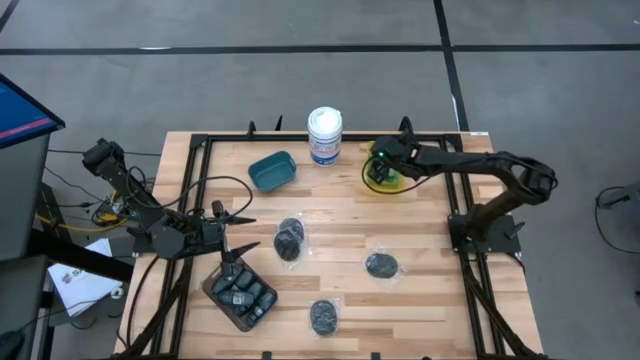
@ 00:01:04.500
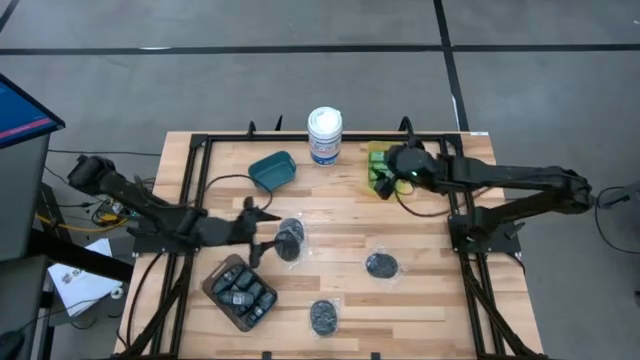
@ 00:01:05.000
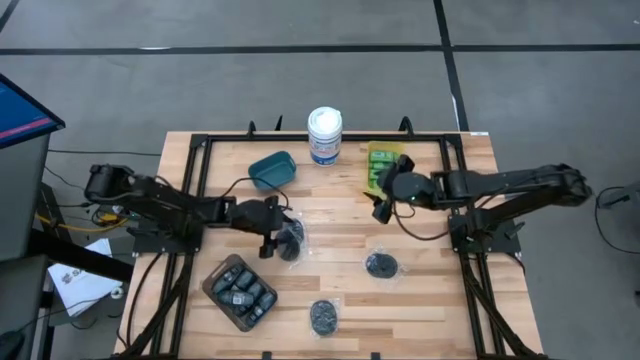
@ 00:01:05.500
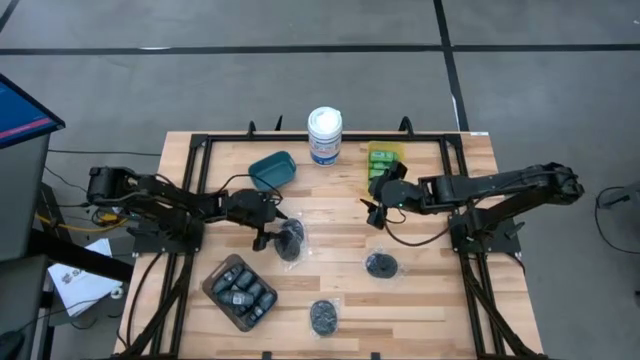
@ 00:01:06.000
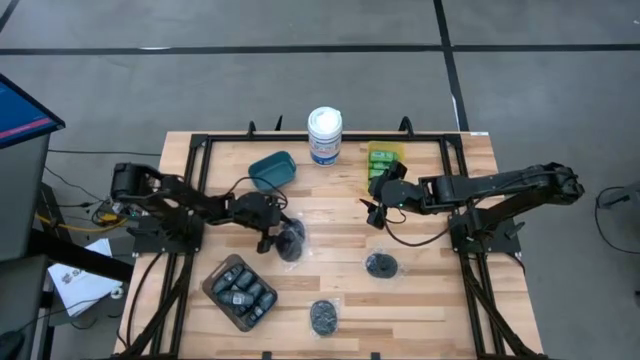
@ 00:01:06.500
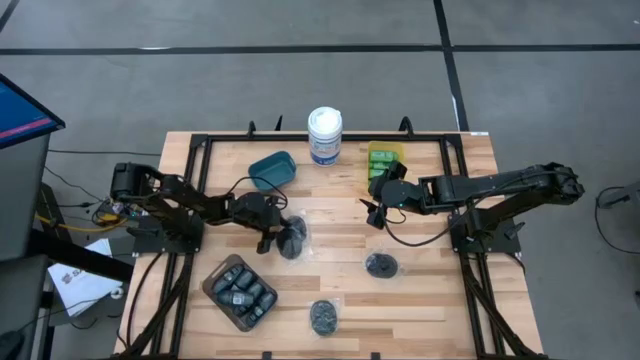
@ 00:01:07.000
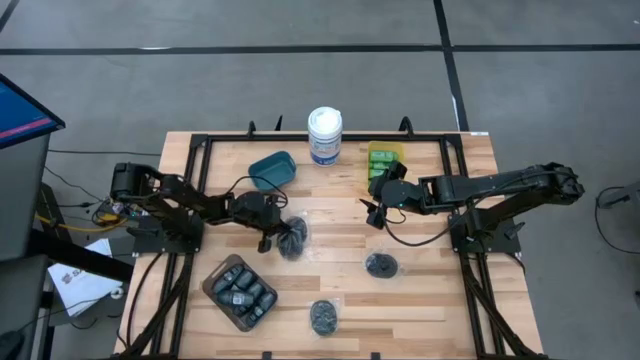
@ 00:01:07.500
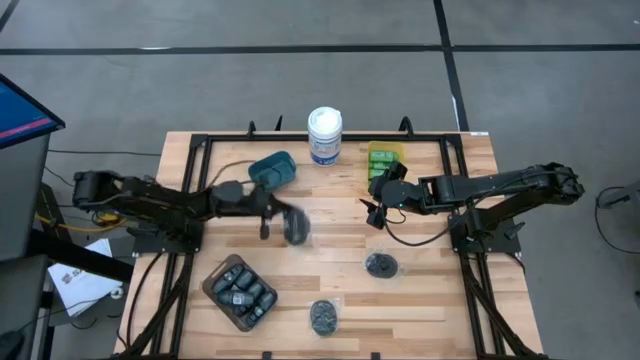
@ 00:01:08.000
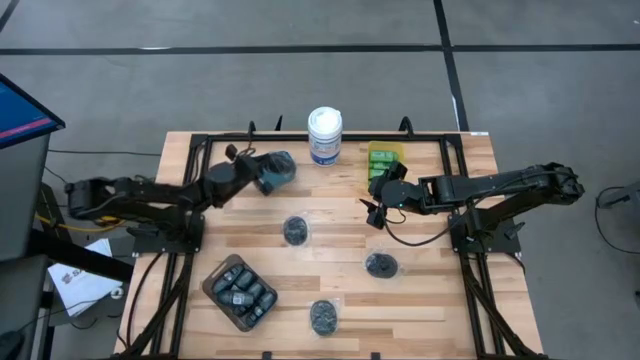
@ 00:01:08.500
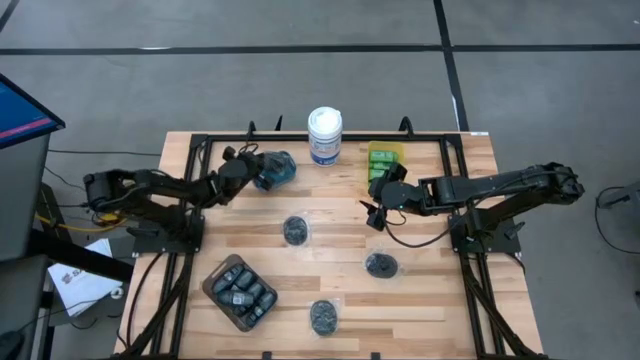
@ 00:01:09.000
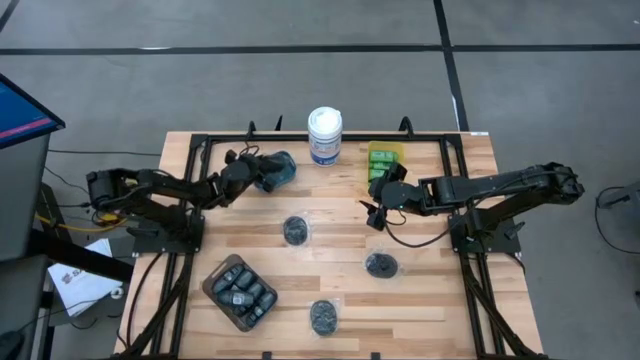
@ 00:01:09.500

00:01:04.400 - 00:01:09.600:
Task: Pick & Place Travel size toiletries
Put the black hairbrush into the blue bin

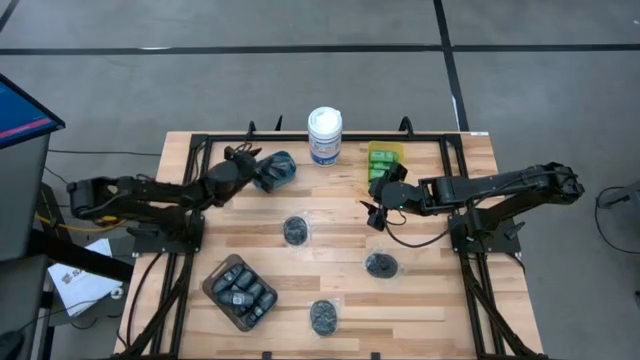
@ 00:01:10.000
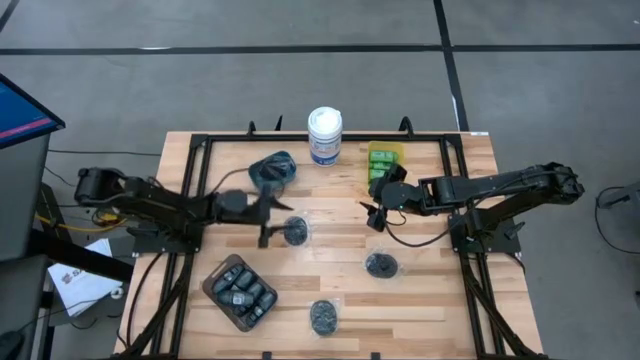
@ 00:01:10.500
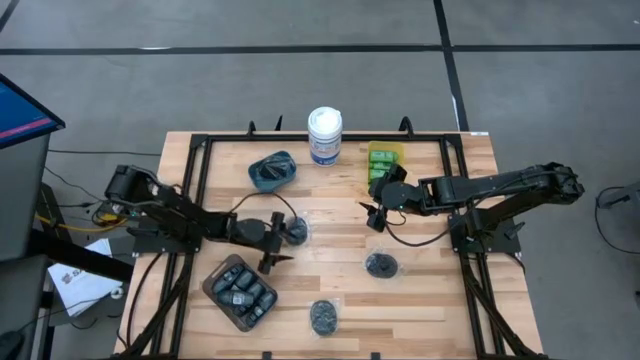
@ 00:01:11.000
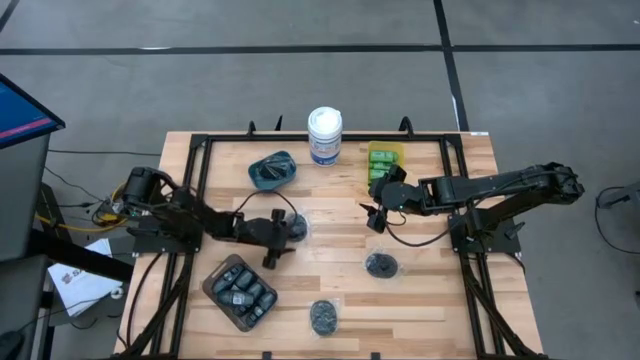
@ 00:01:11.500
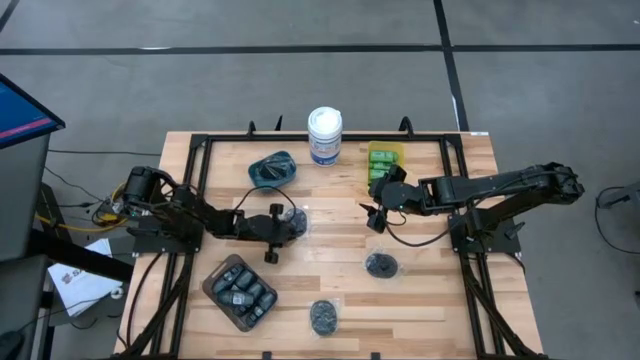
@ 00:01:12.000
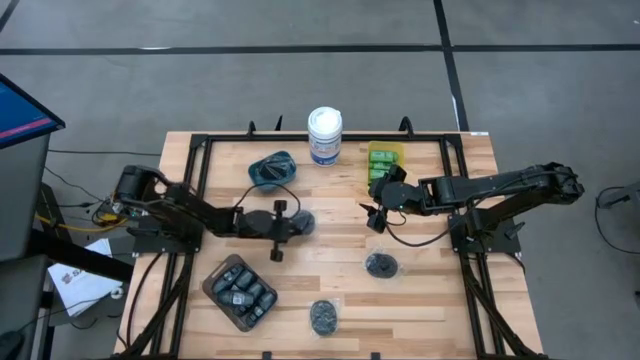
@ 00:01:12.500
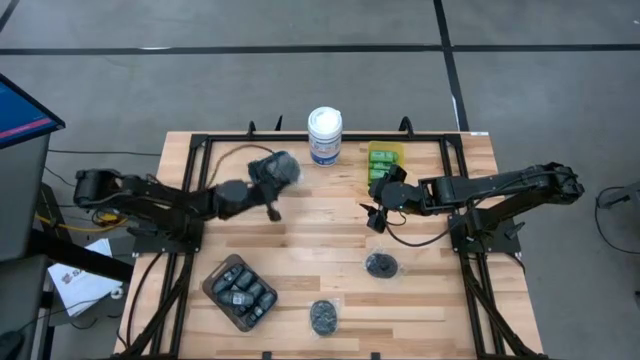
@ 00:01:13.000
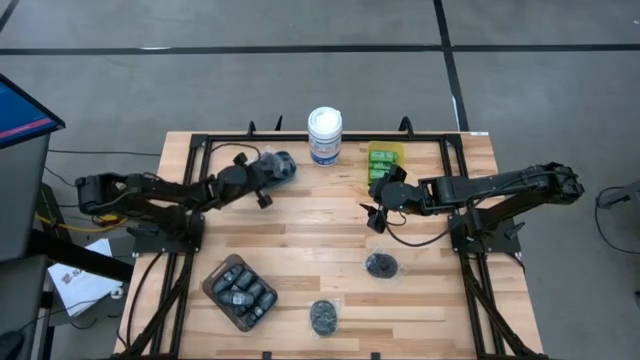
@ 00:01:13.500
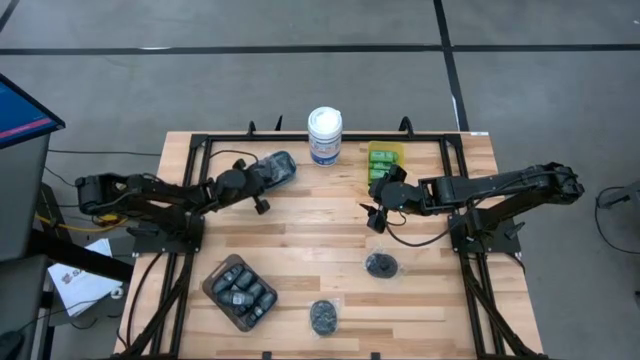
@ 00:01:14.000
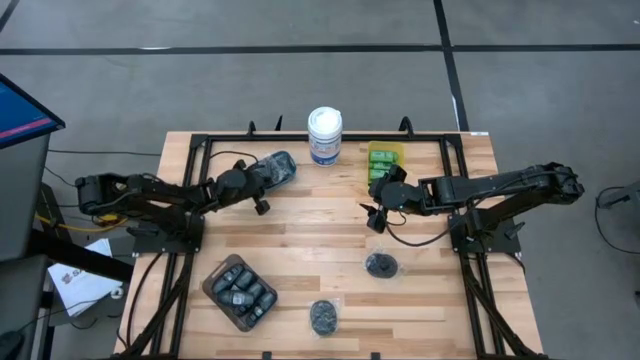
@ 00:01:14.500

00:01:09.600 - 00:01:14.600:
Put the black hairbrush into the blue bin

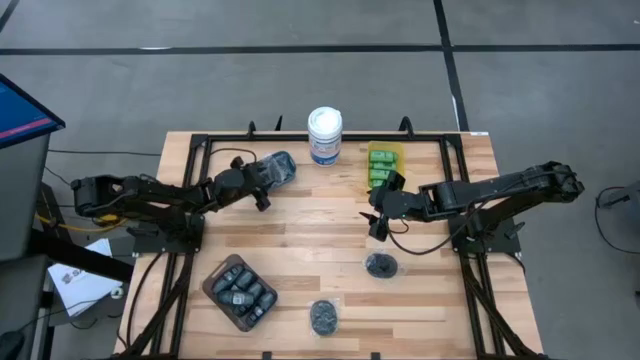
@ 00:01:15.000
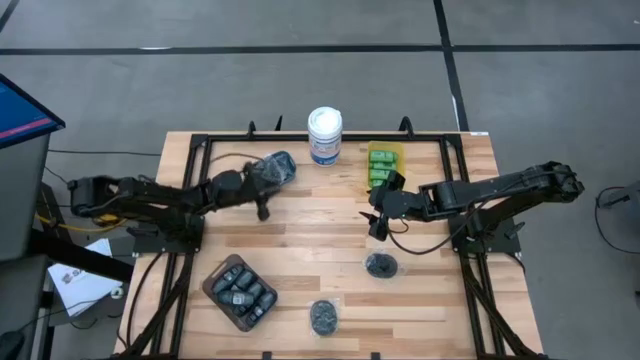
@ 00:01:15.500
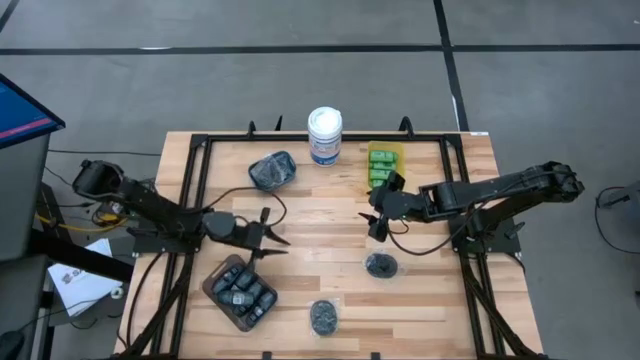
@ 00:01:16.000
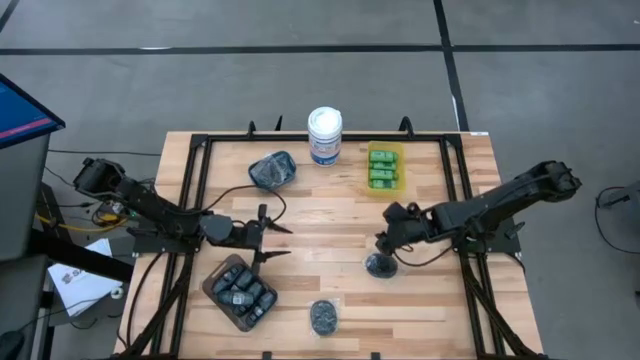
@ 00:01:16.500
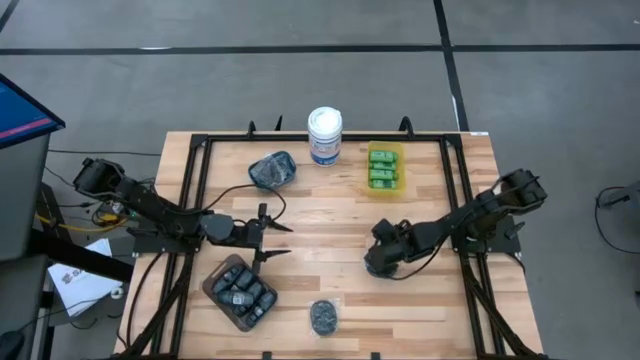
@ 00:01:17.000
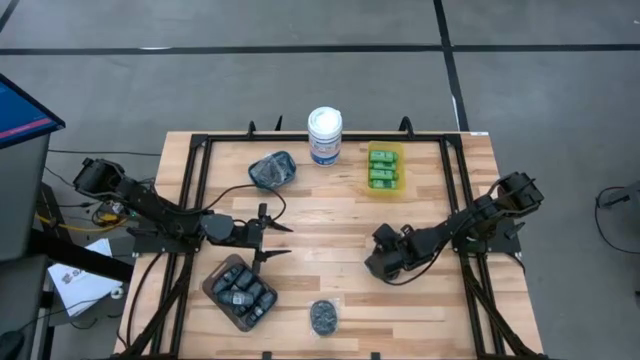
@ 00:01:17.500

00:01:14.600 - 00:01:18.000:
Put the black hairbrush into the blue bin

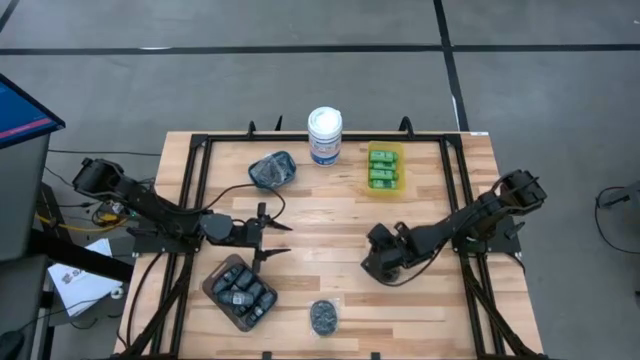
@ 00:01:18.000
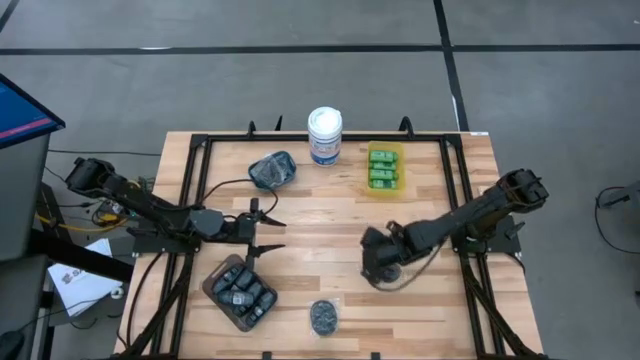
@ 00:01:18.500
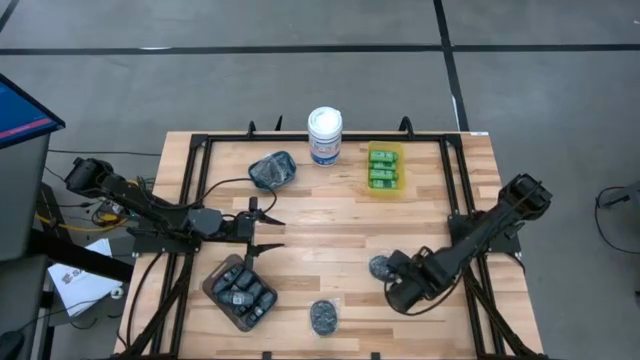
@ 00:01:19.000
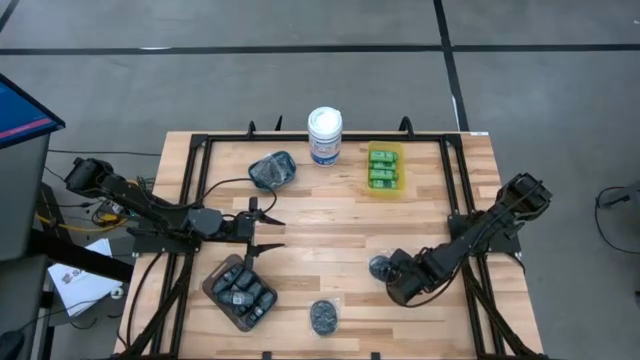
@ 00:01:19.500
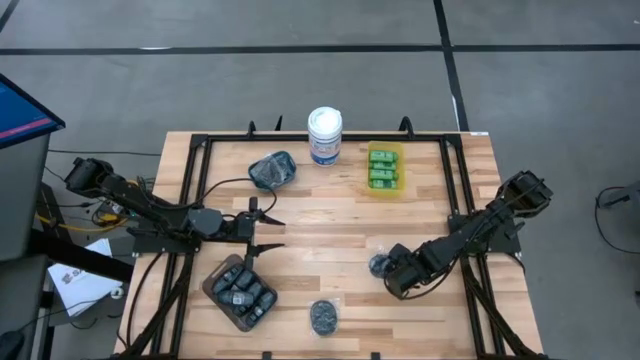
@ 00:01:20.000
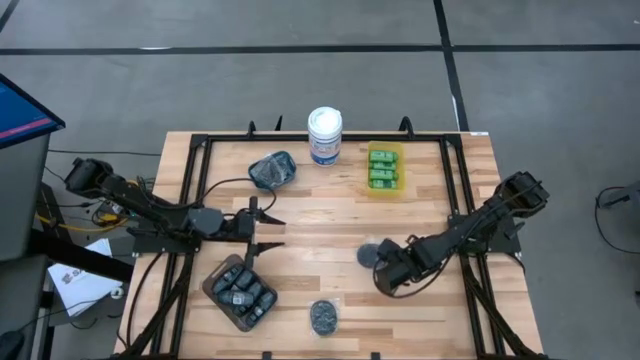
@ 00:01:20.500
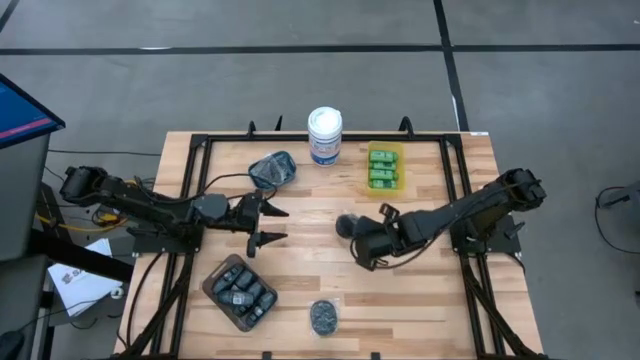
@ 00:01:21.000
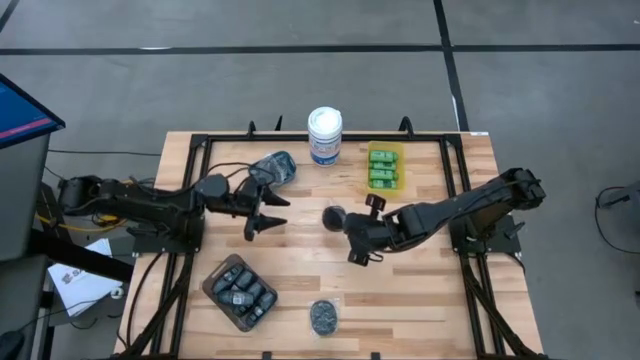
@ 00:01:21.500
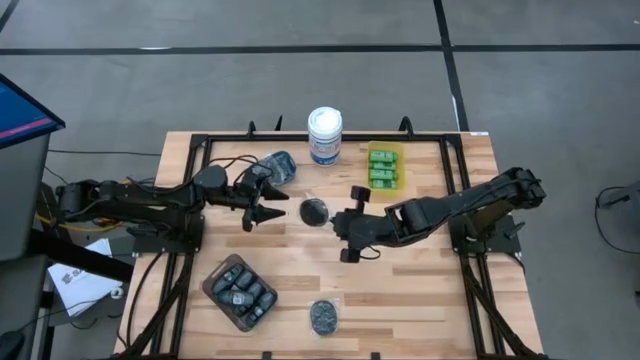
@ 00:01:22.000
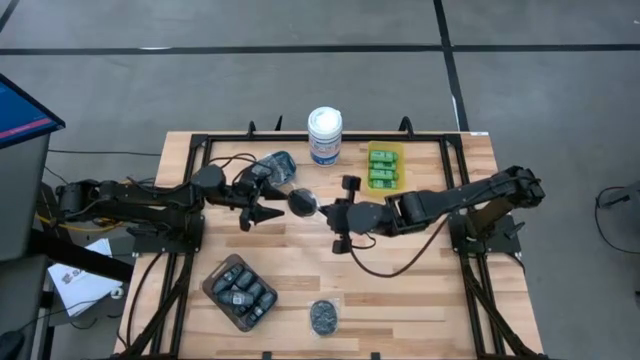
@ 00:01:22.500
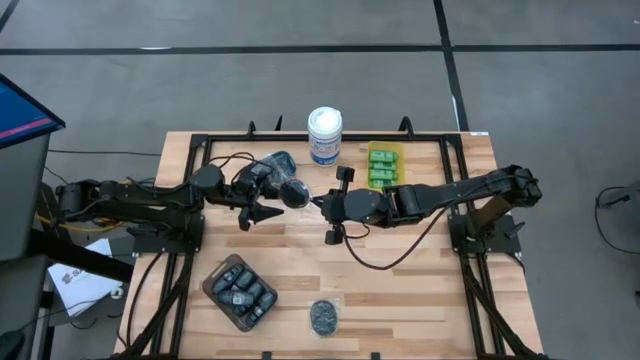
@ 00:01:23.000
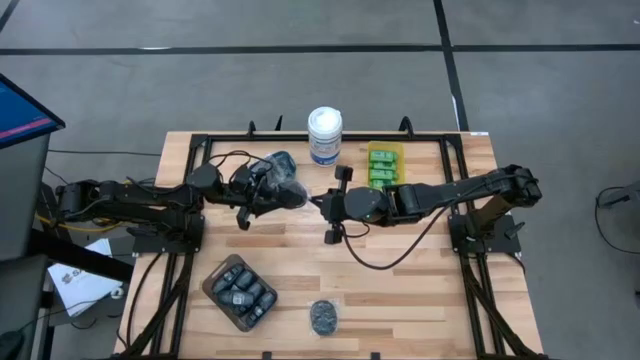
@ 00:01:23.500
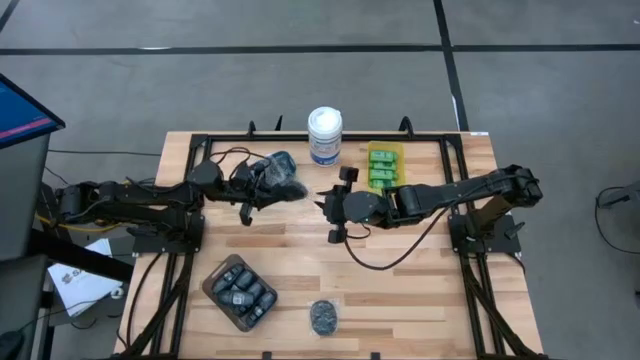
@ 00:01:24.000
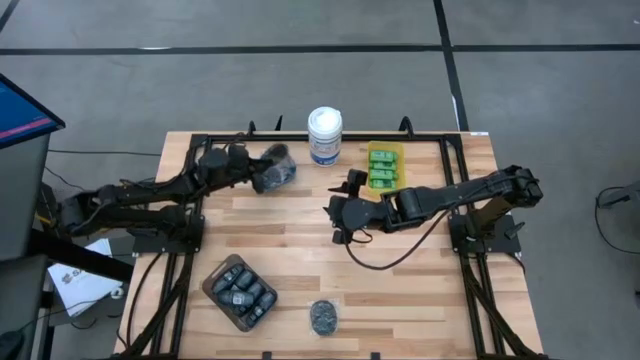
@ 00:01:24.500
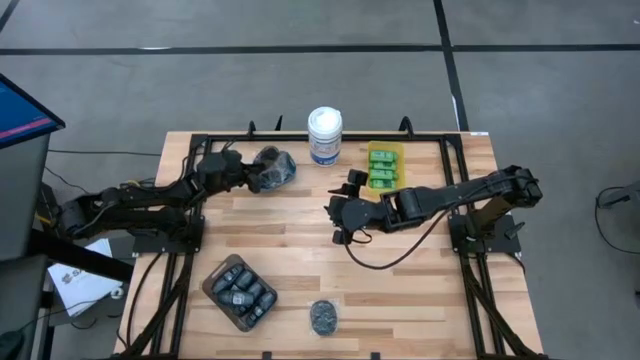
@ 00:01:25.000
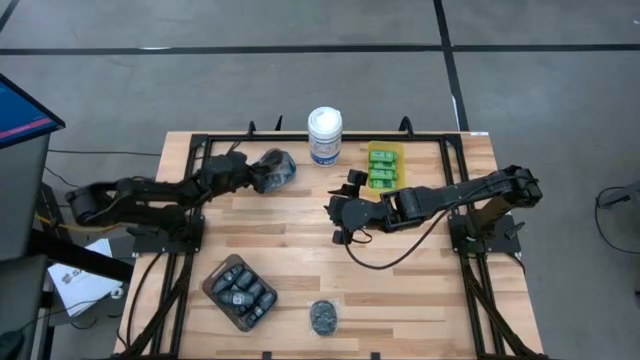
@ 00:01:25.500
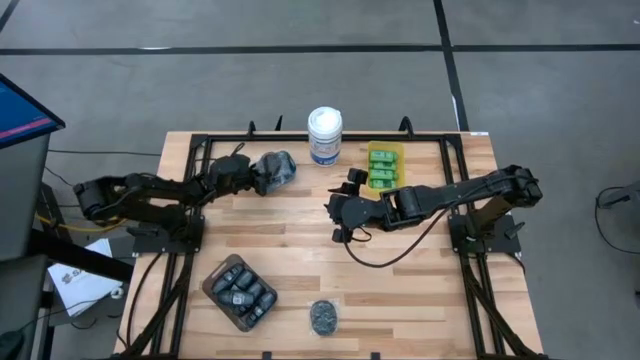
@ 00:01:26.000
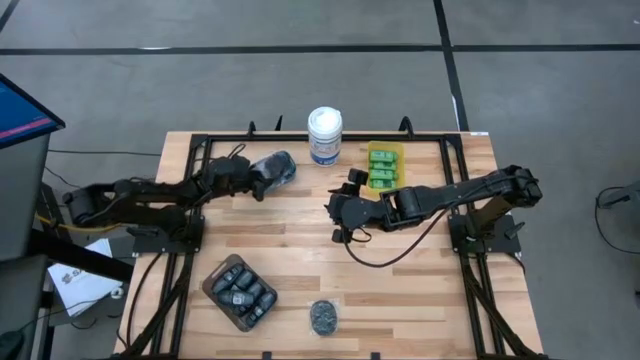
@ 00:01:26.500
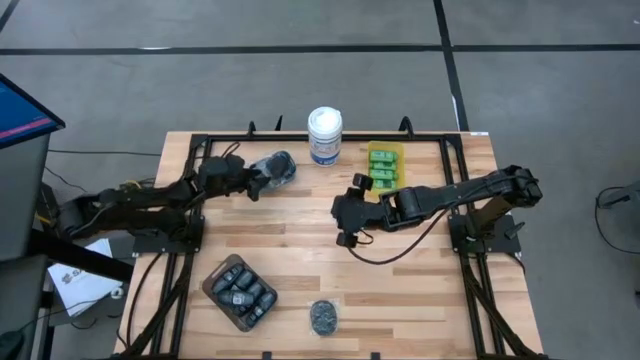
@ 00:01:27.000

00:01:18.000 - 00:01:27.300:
Put the black hairbrush into the blue bin
